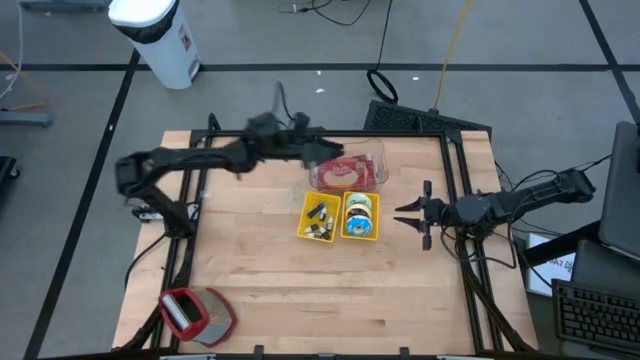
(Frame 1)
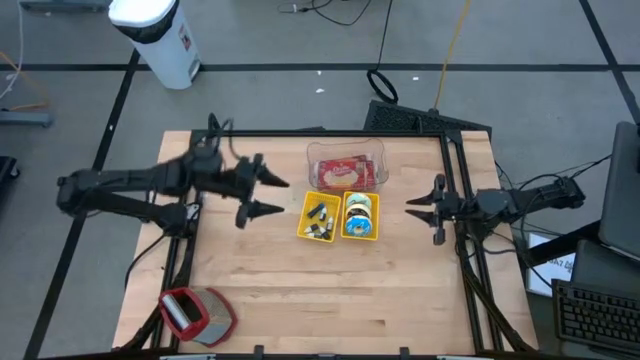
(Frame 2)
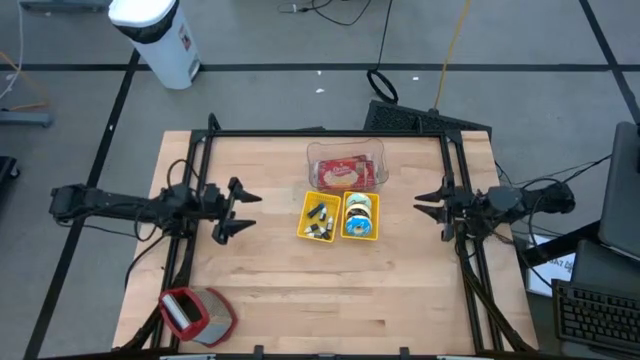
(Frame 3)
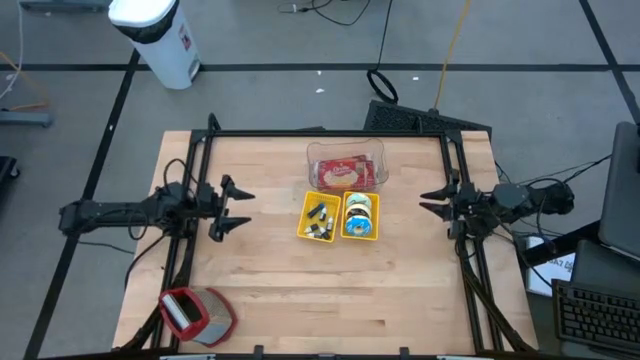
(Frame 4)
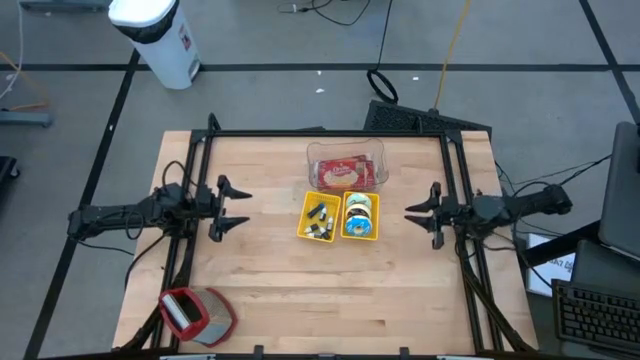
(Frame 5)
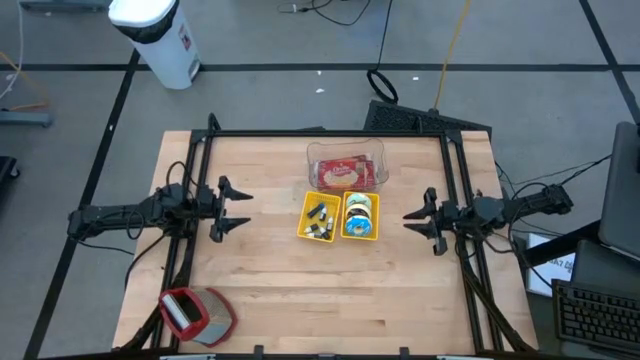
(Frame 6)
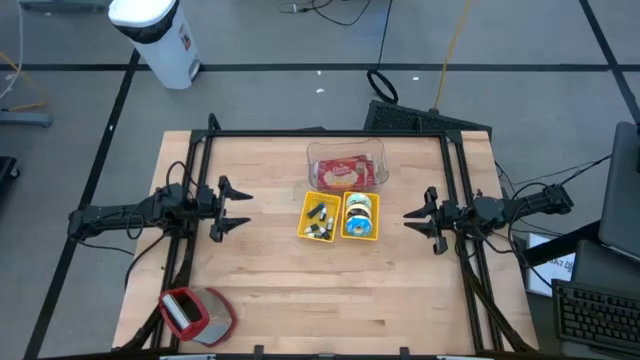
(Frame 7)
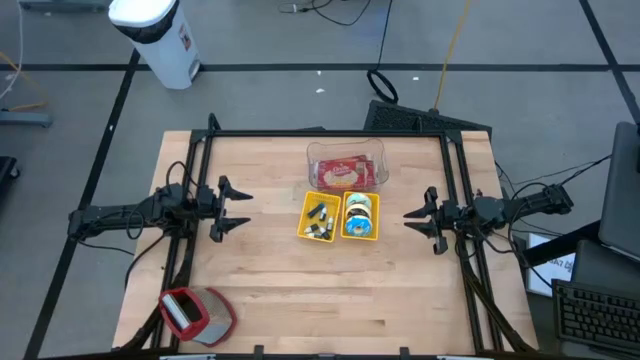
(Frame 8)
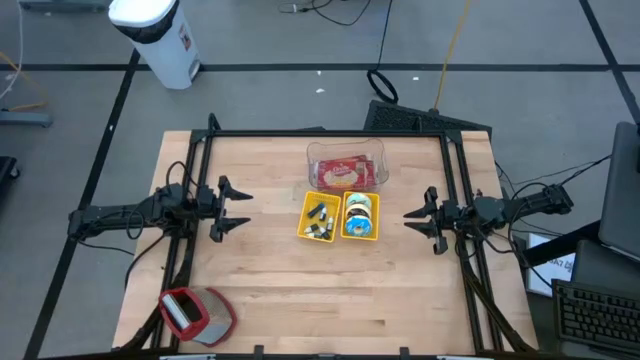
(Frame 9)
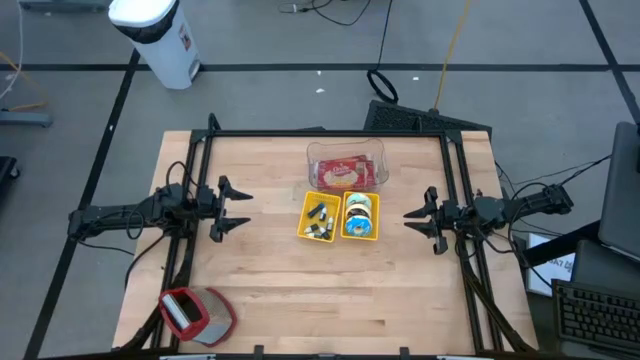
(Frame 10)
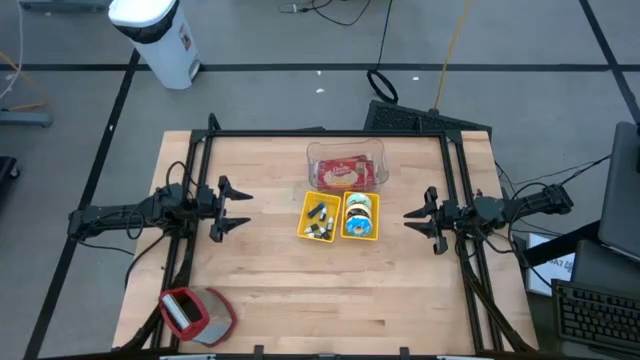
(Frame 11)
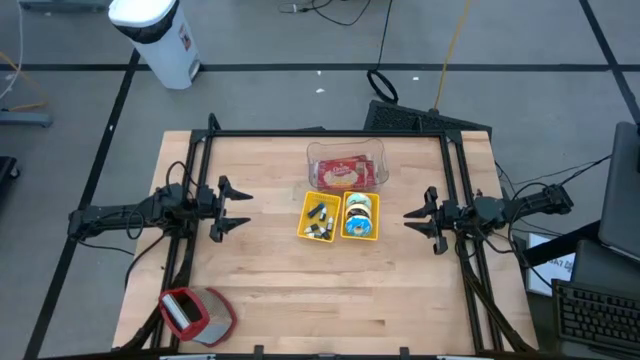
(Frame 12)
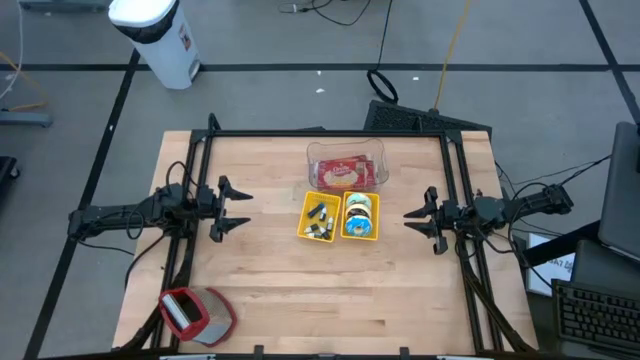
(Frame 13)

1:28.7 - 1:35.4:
Return to Home Position

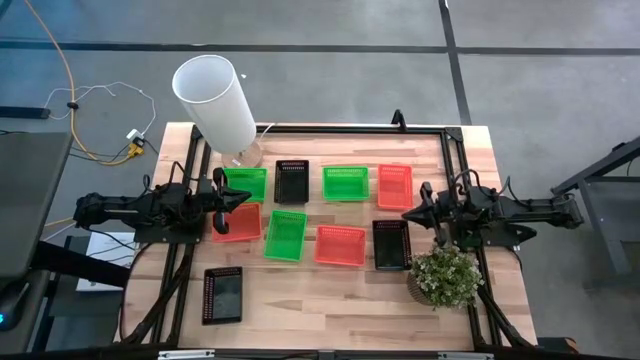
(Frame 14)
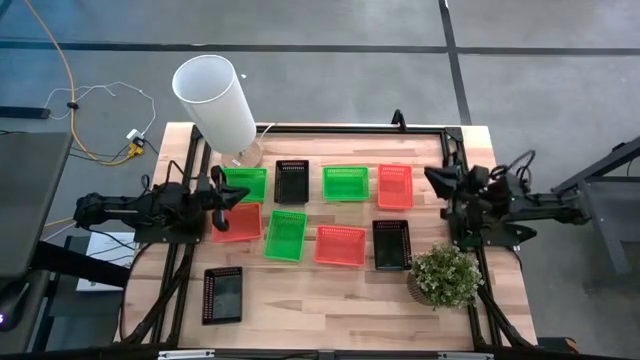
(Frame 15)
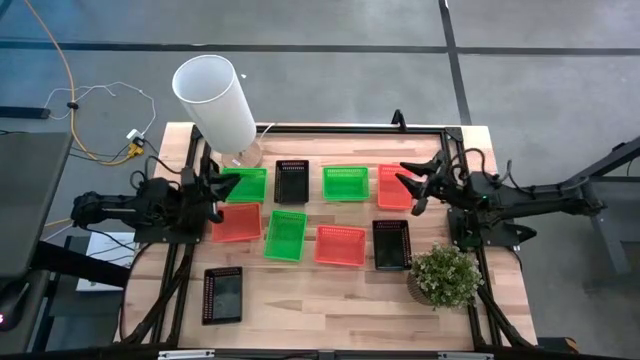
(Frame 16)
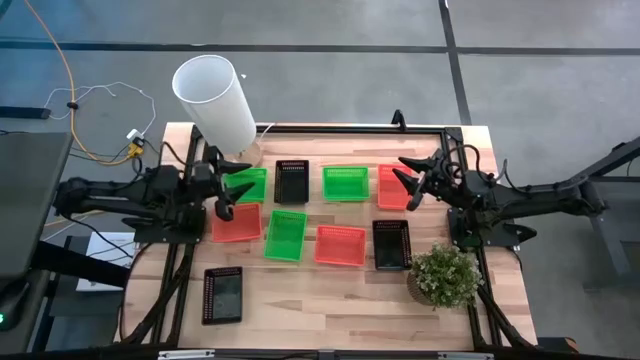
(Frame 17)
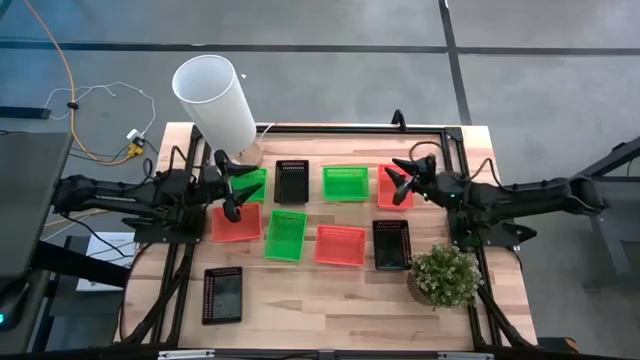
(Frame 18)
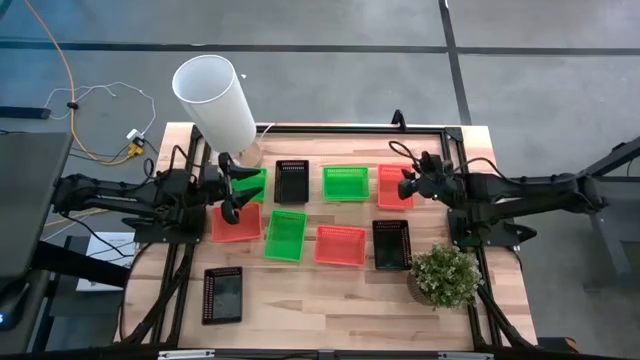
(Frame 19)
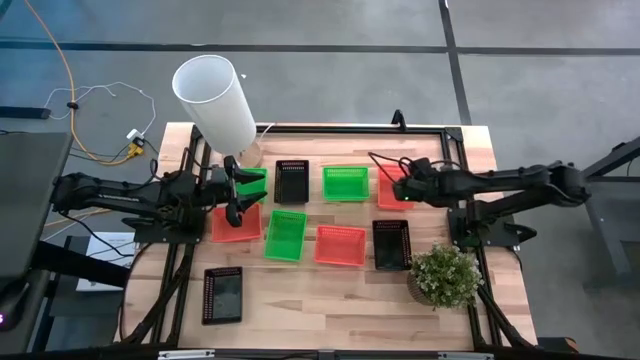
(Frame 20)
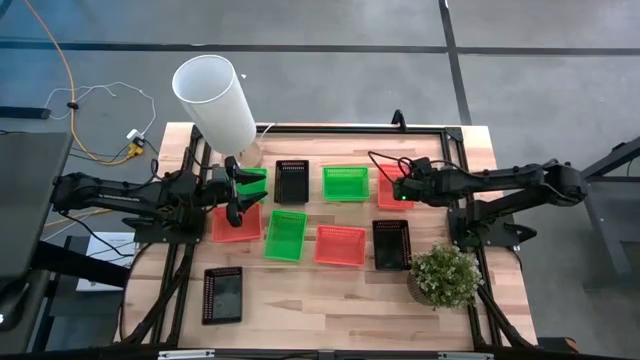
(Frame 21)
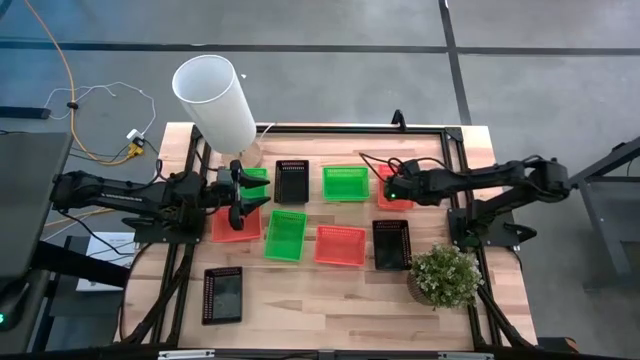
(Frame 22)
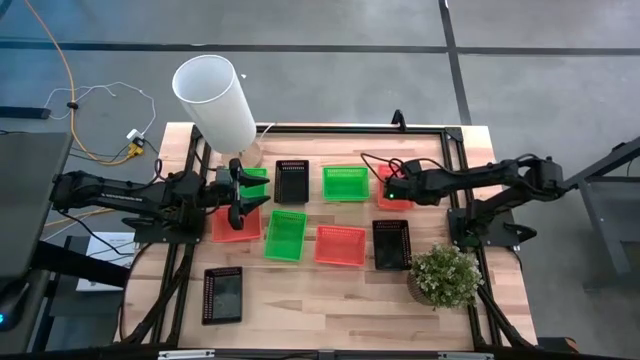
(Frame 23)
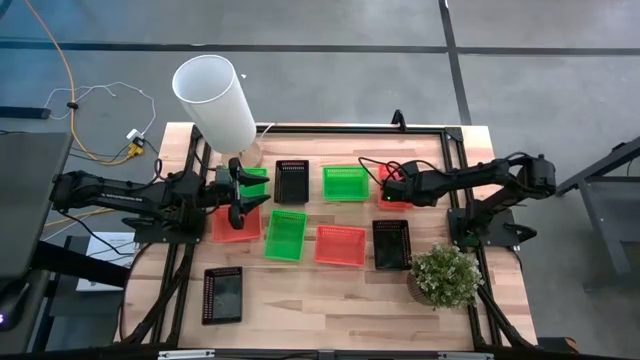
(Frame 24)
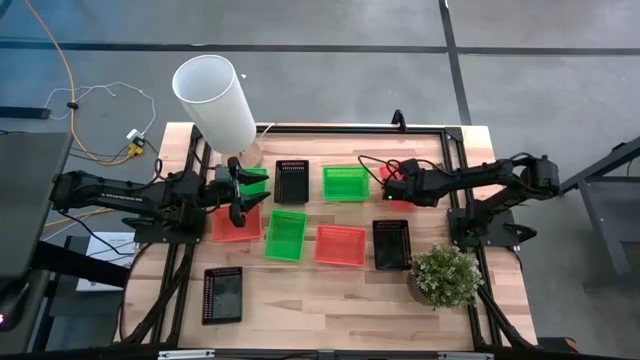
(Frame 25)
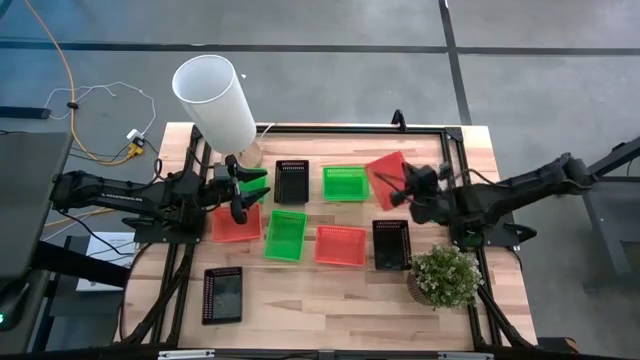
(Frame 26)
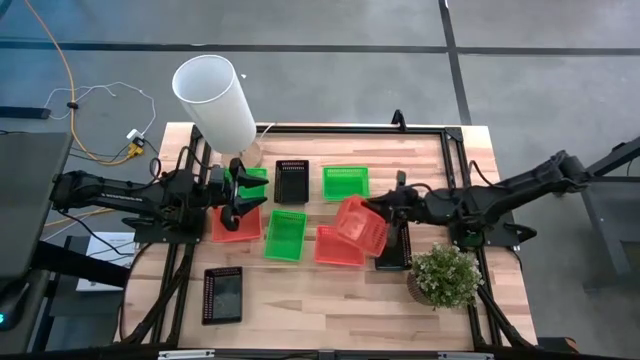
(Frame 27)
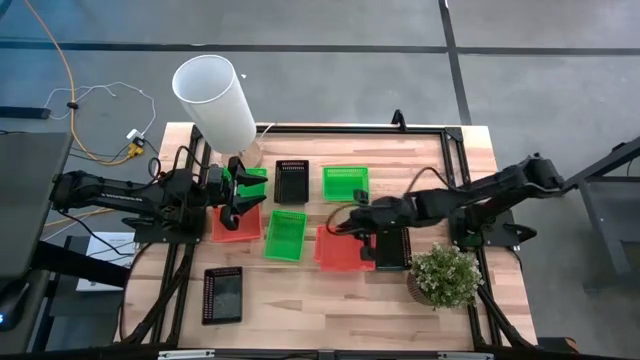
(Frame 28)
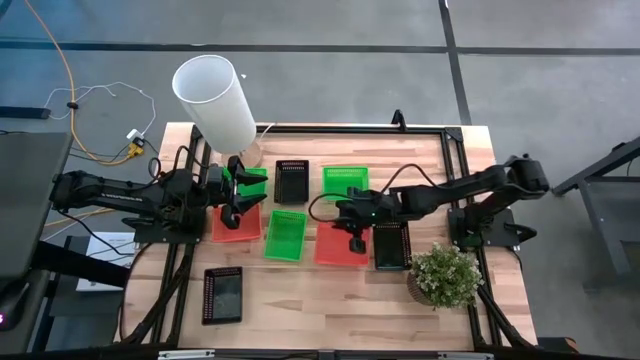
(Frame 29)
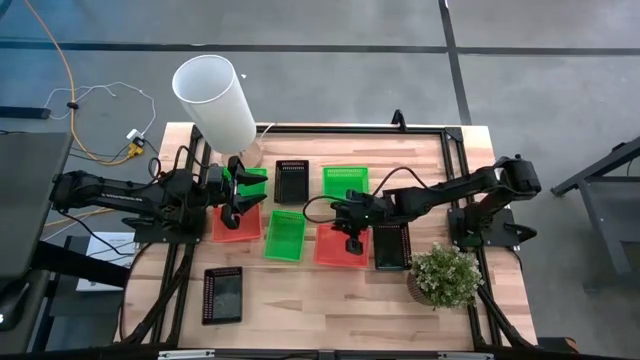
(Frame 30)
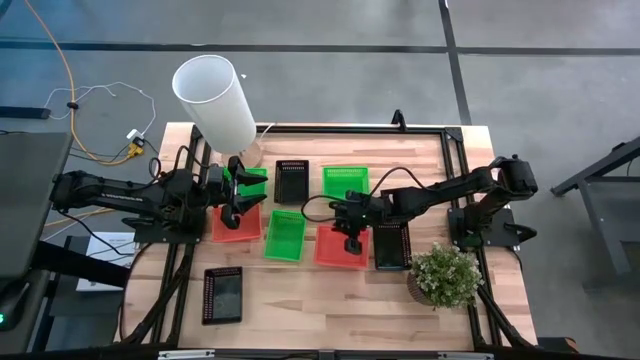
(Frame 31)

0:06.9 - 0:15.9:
Stack the top orange bin on the bottom left orange bin

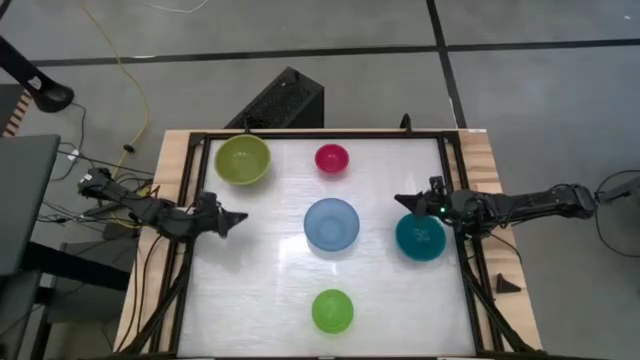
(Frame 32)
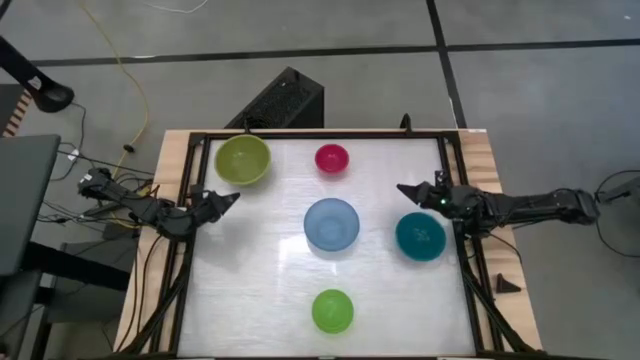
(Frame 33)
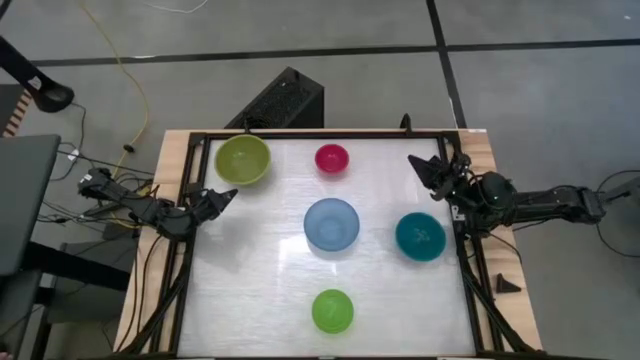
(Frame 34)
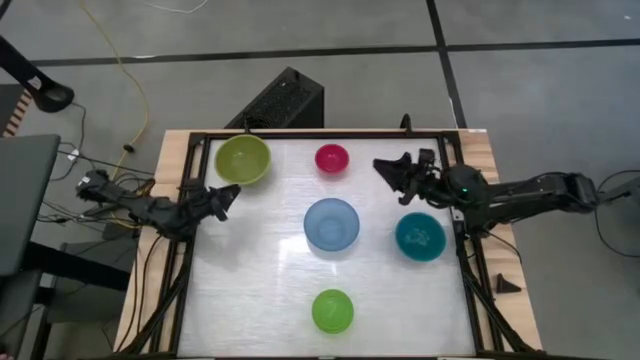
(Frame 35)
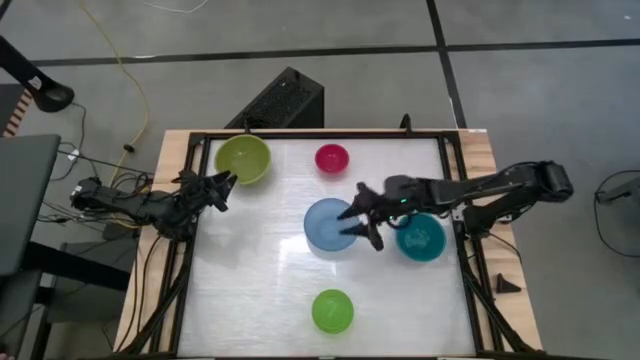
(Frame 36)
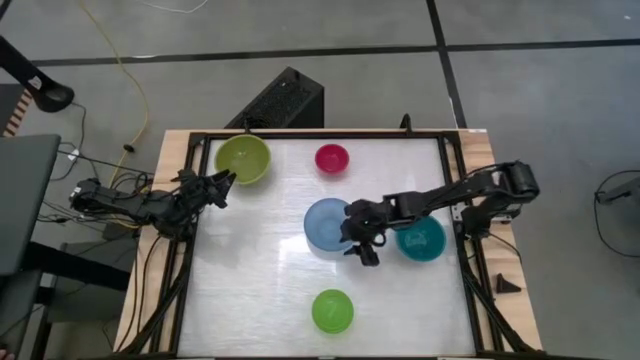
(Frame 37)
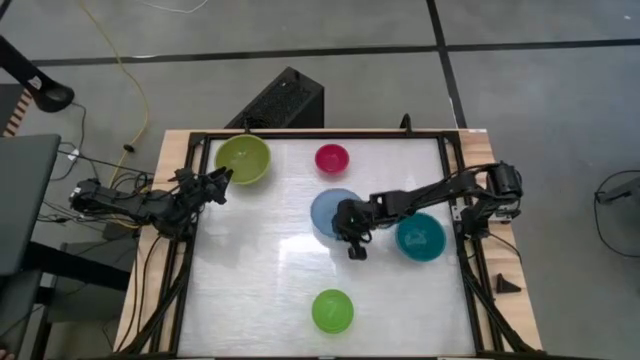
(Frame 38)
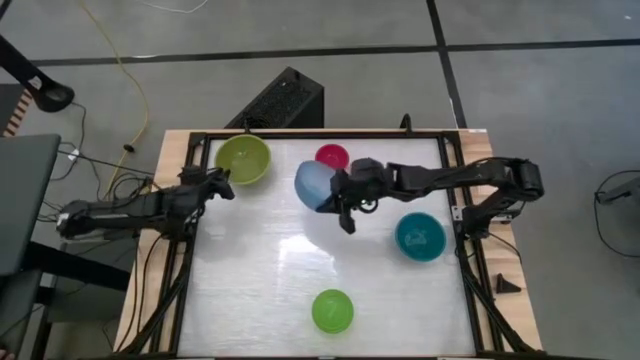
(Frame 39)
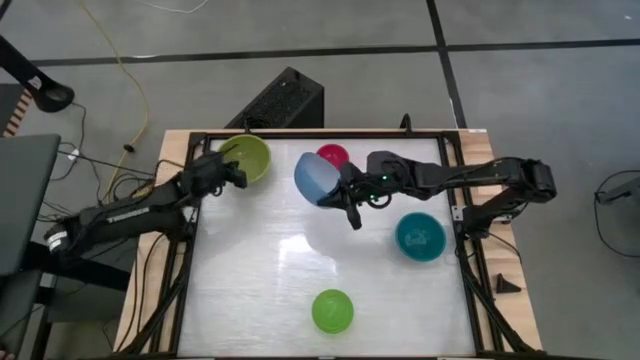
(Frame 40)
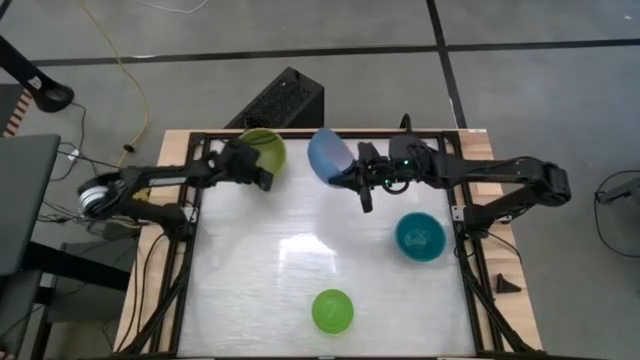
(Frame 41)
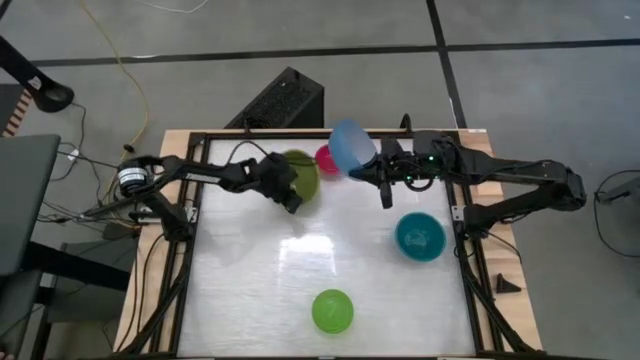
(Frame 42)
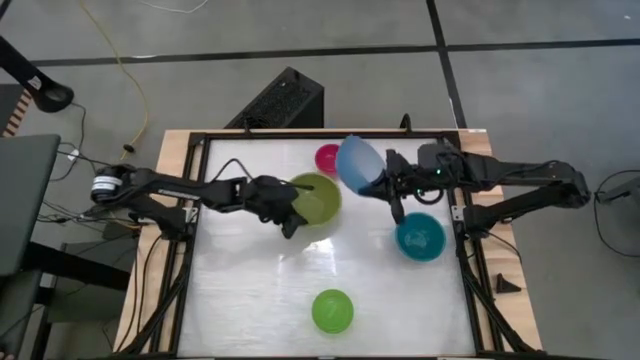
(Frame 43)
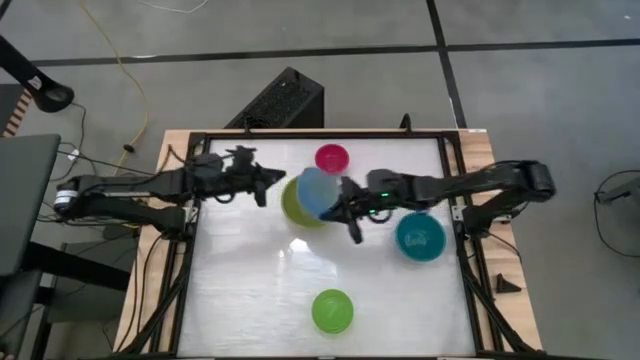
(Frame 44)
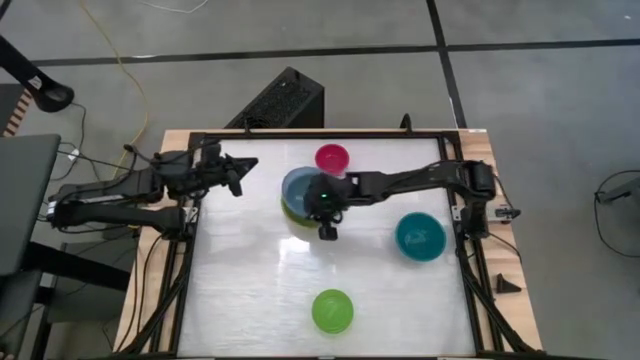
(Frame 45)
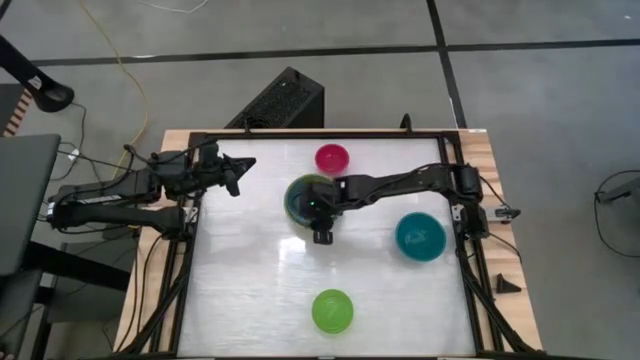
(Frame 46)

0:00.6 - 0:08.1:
Stack the blue bowl on top of the dark green bowl
